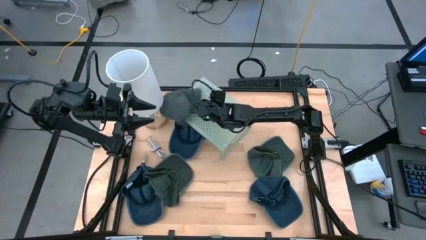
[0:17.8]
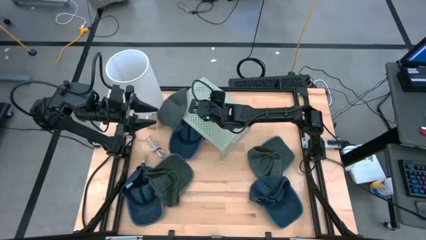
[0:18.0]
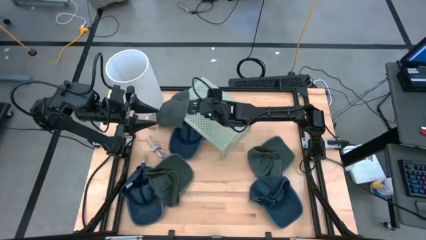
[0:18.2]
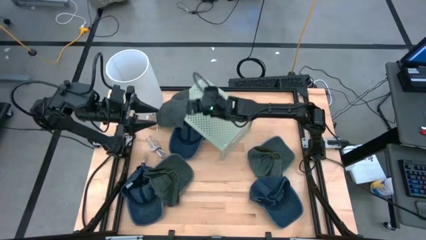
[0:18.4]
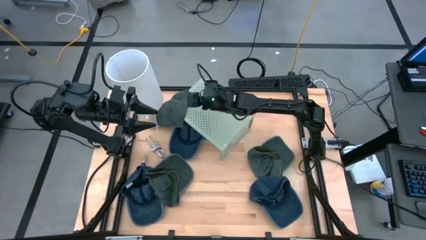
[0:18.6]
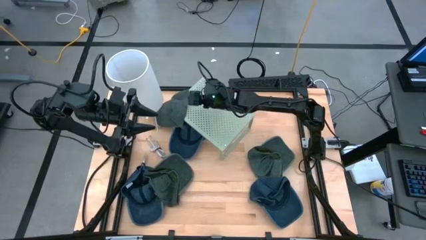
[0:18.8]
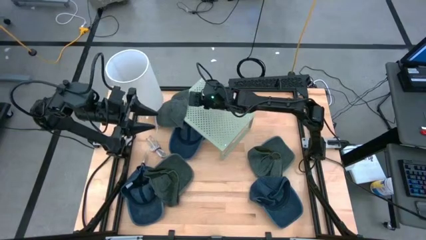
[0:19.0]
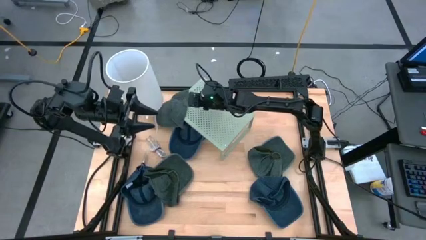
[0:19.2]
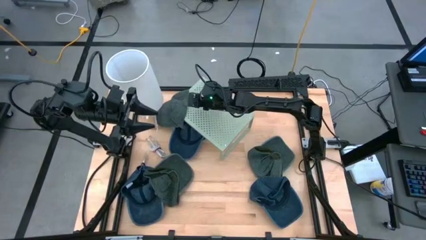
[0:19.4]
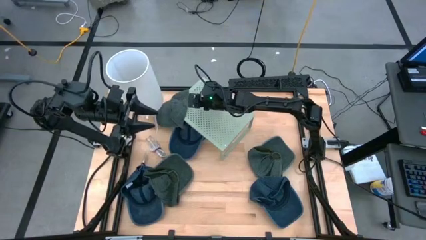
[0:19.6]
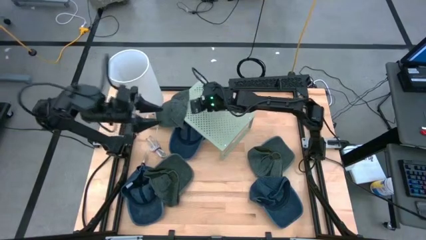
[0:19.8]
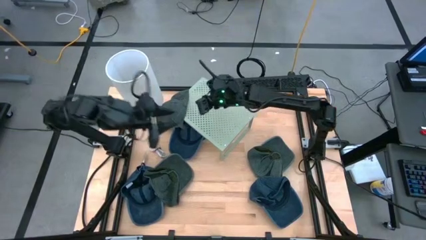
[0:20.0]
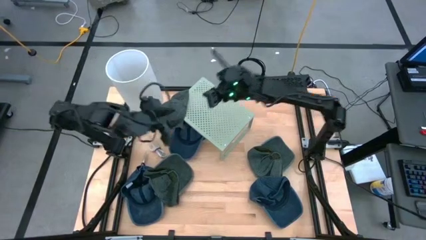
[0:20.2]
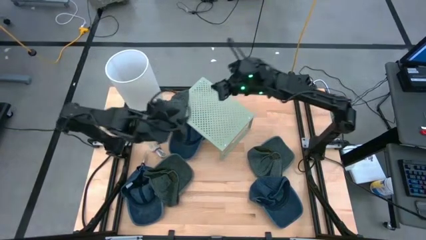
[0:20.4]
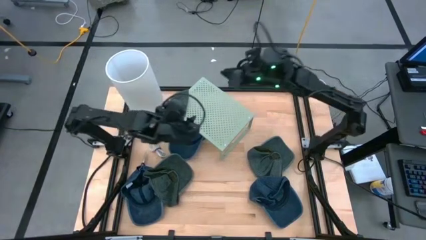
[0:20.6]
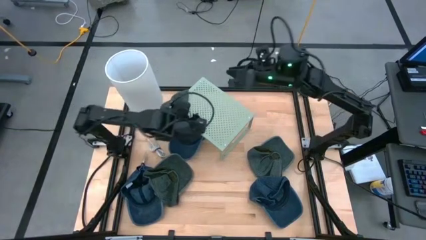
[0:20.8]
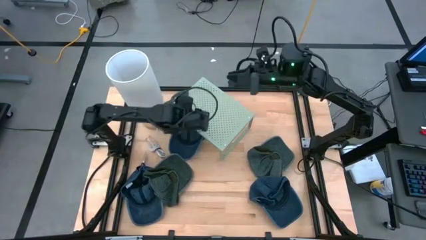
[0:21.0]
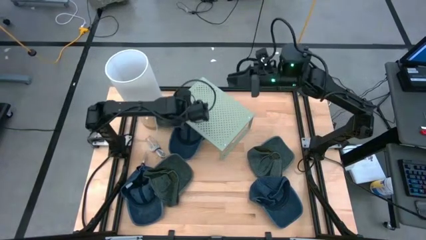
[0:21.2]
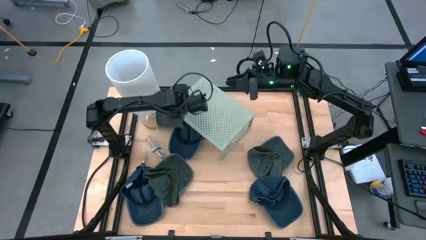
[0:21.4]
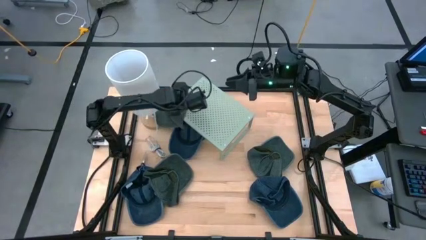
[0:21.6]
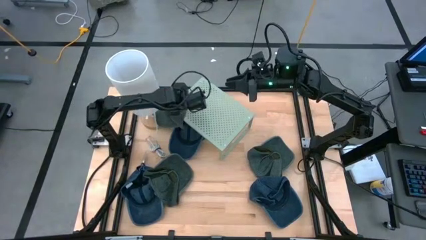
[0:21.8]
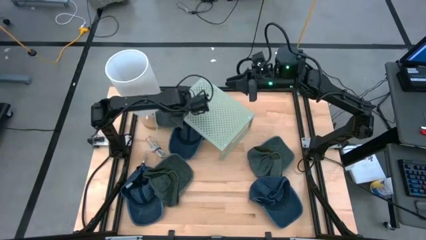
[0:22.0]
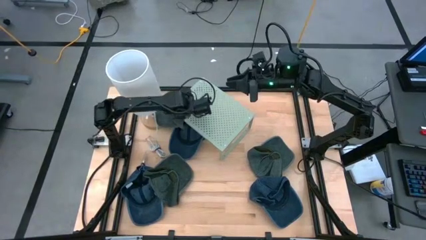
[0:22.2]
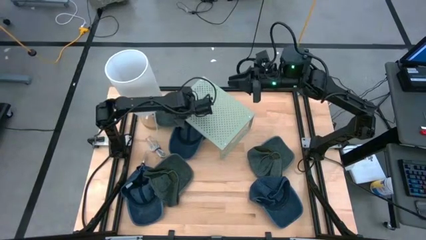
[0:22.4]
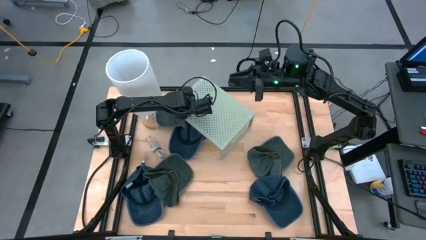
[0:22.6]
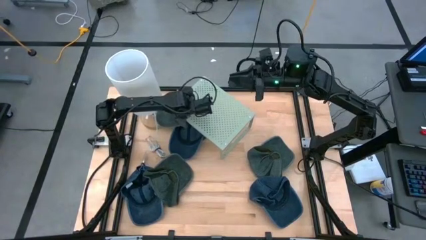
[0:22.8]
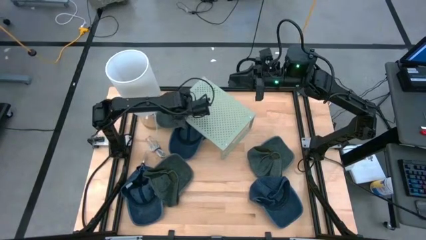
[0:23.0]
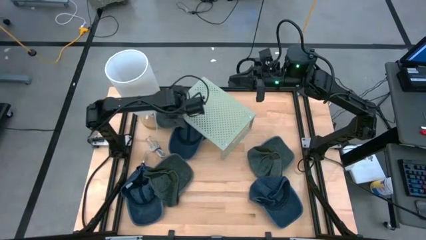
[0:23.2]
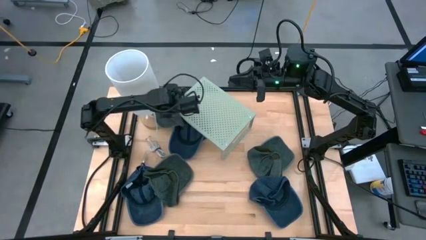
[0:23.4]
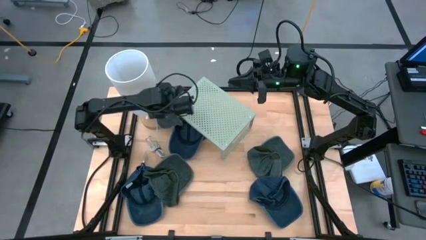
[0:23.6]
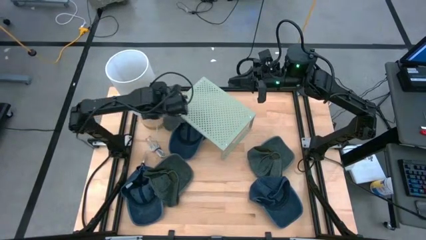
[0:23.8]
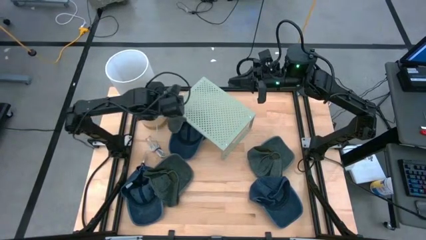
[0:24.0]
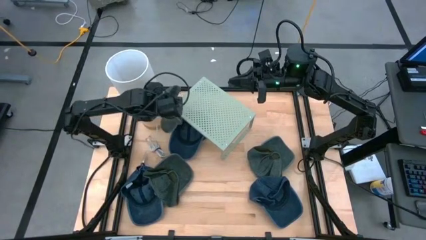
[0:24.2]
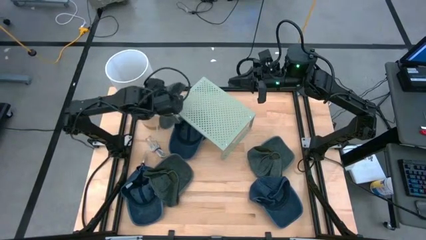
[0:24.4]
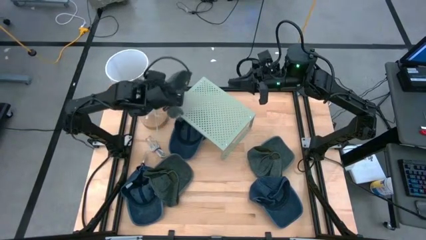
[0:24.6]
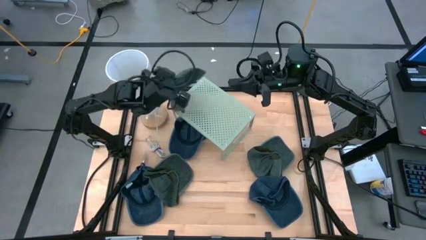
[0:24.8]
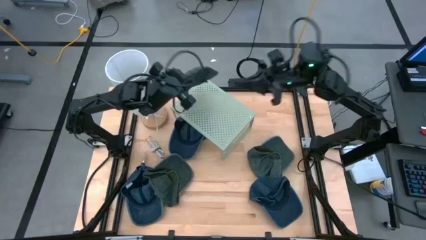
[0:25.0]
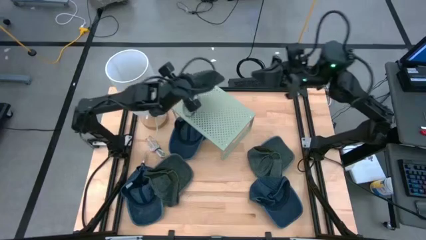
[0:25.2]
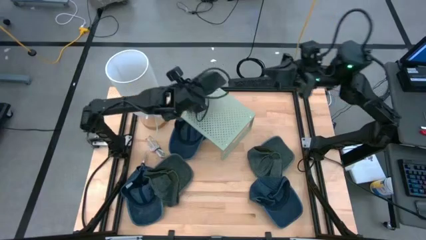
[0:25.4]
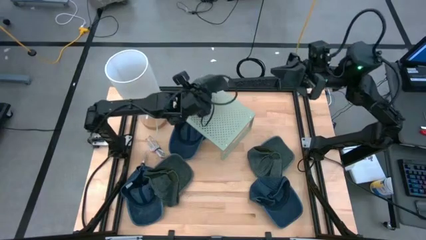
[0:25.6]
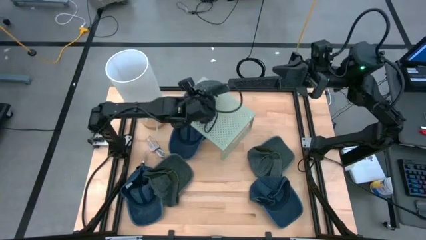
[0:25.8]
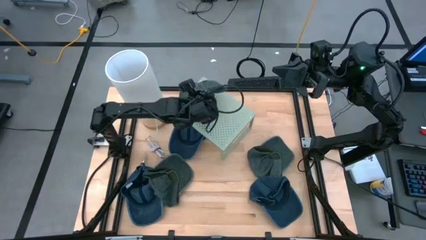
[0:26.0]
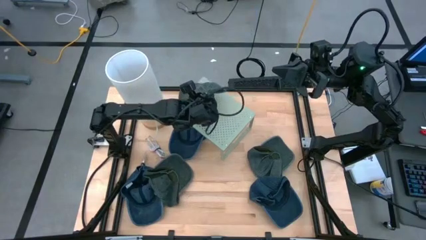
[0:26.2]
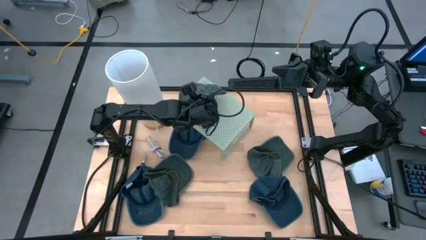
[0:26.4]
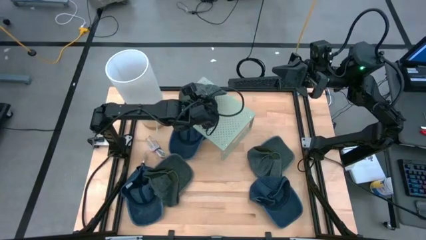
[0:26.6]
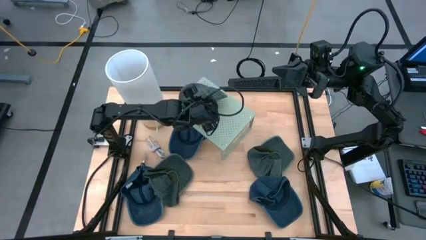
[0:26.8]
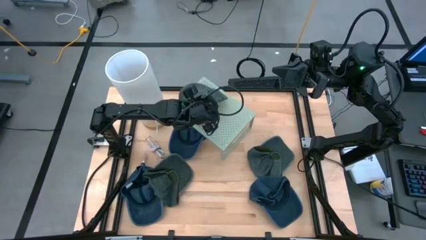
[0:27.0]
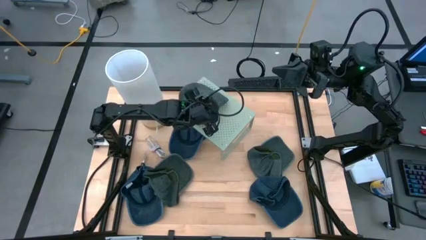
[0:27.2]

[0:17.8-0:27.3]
Task: Pick & Place hat
Put the top black cap on the shelf

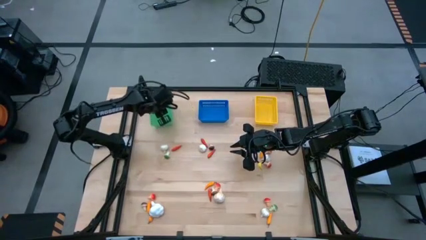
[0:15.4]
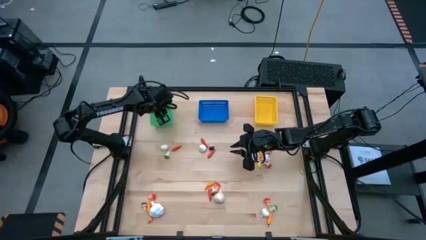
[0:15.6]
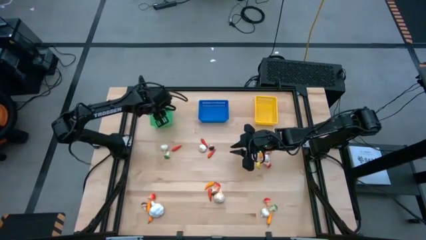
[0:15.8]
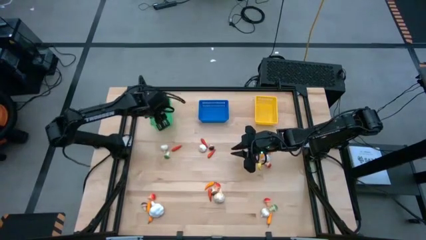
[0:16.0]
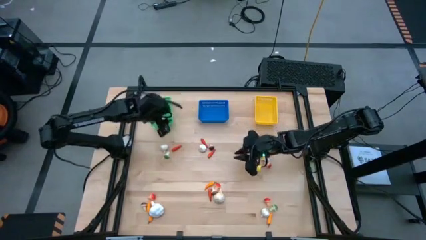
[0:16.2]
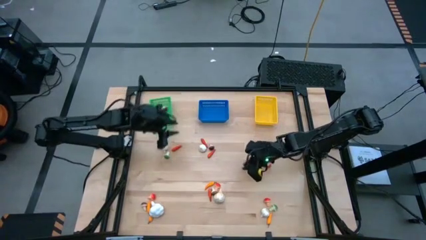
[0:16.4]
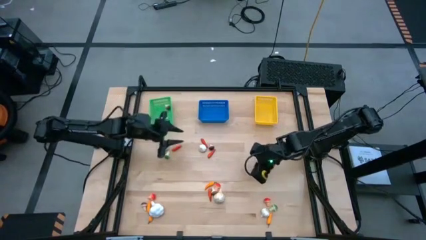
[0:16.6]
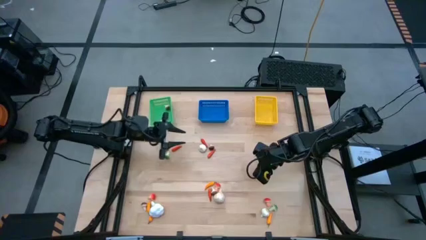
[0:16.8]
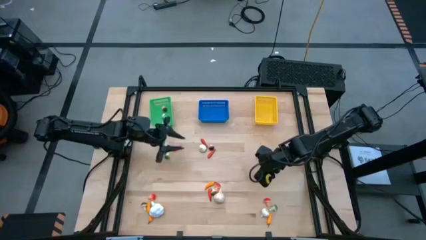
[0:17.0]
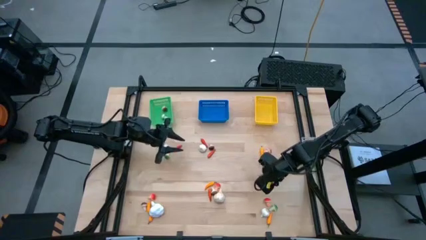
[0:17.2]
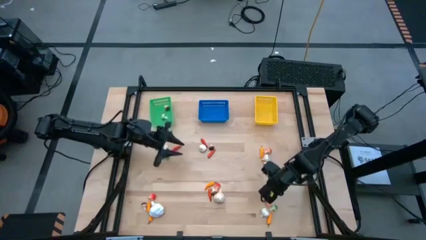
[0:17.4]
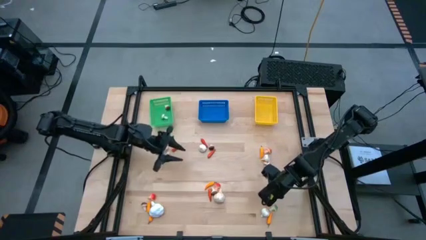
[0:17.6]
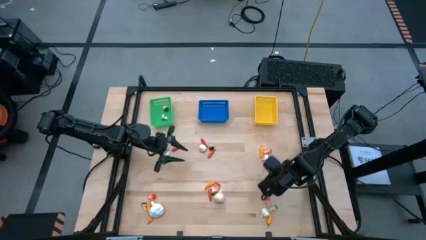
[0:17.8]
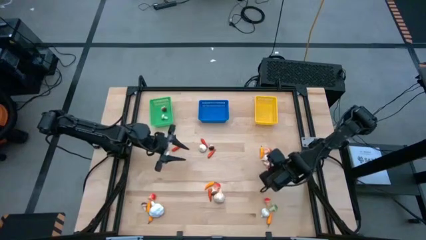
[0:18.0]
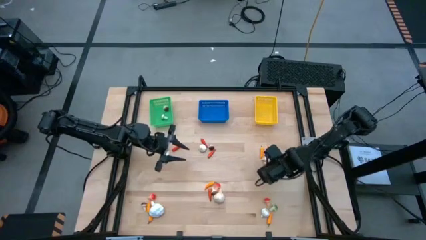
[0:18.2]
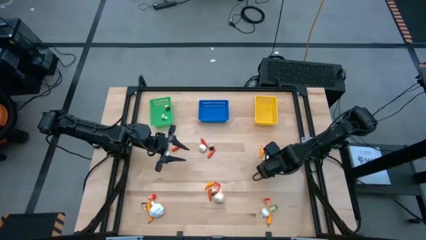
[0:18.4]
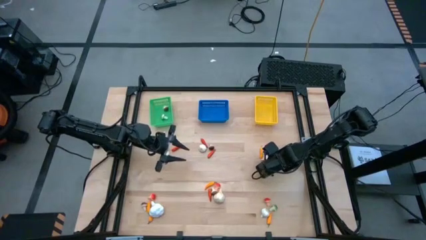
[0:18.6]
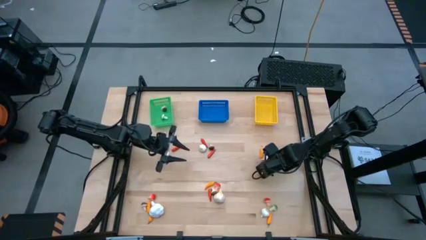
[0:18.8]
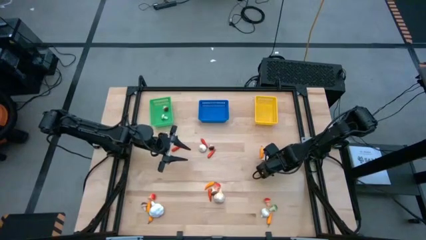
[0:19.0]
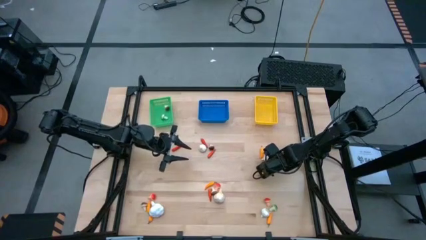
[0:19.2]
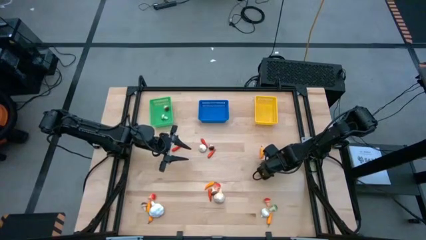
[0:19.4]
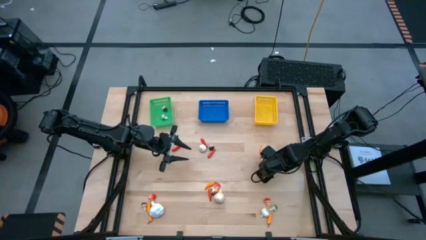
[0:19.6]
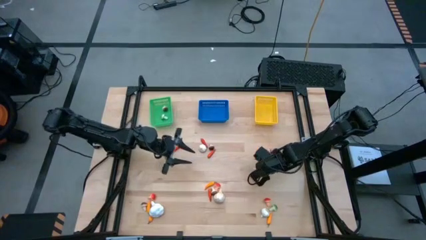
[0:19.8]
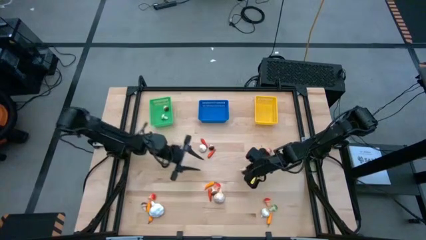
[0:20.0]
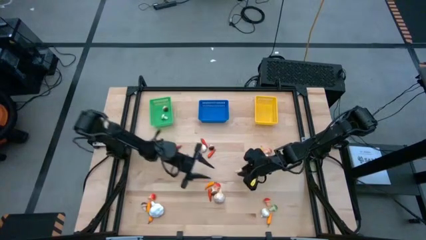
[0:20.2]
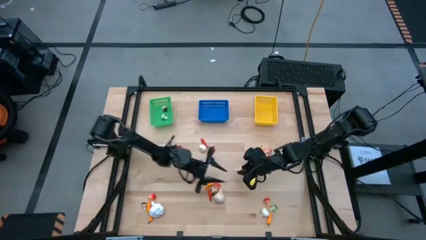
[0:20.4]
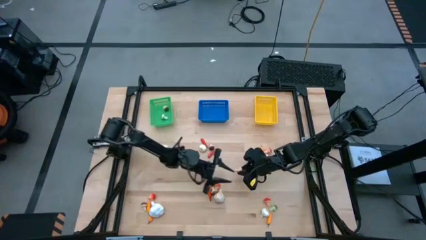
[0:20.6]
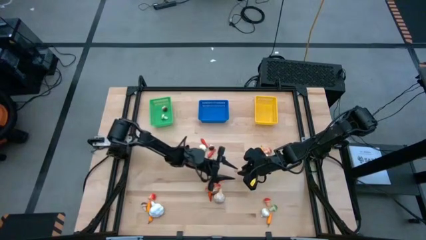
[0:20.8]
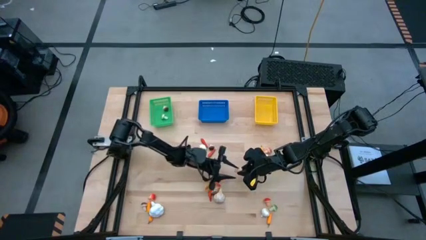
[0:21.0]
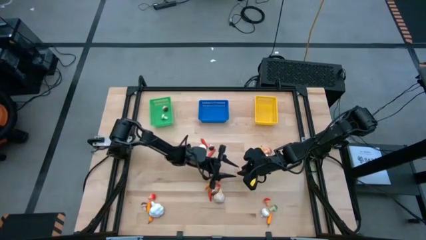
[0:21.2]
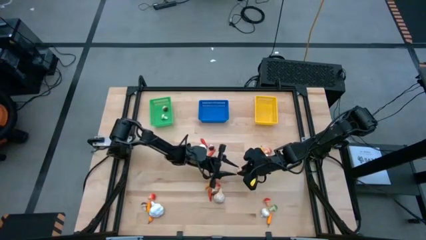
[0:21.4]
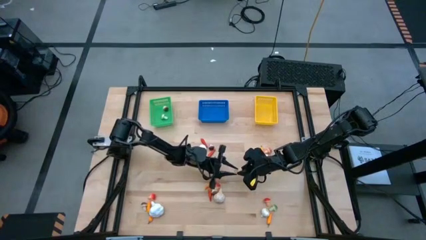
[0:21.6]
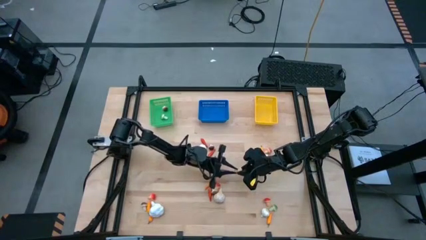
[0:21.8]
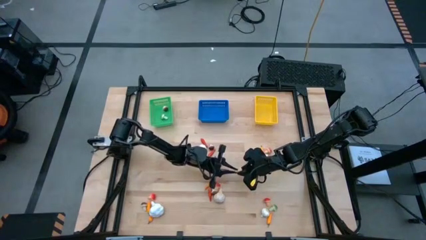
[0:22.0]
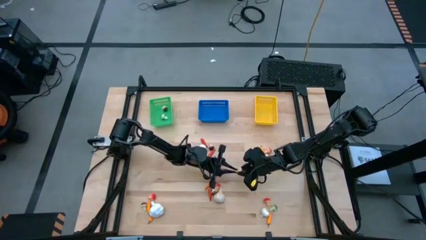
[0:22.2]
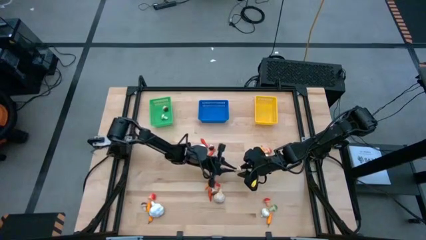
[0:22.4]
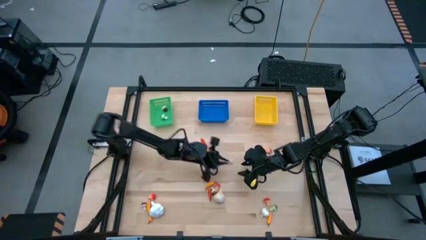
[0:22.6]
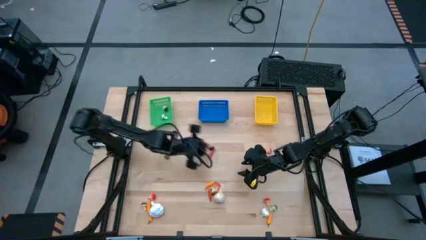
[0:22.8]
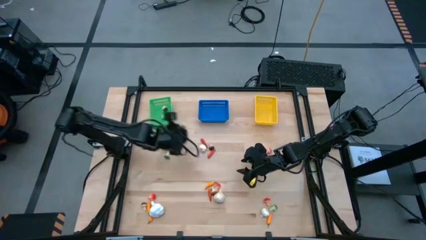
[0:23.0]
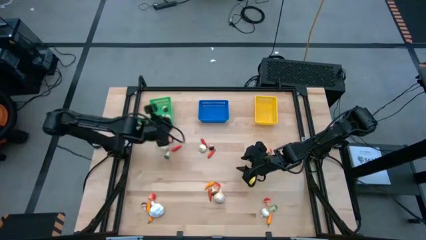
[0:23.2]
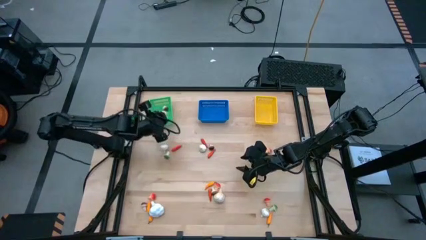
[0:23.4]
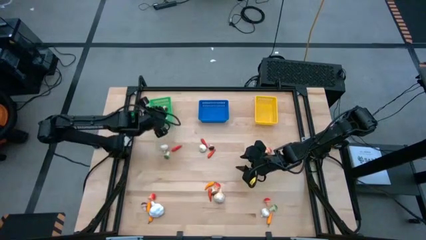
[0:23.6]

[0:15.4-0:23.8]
Task: Sort produce into baskets
Put the orange mushroom into the green bin
